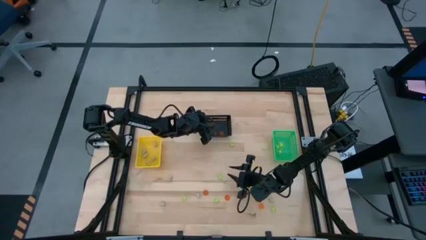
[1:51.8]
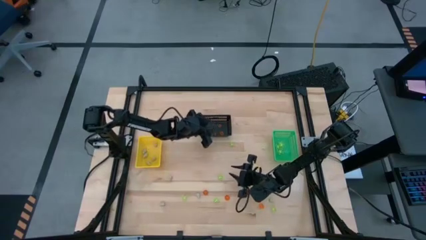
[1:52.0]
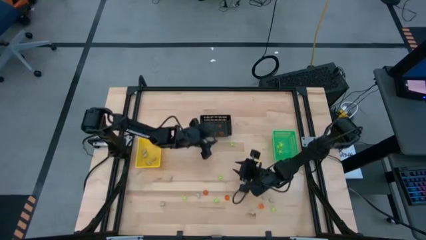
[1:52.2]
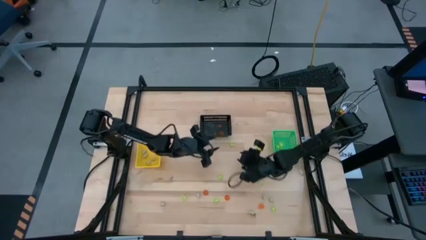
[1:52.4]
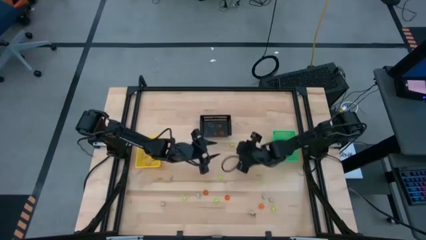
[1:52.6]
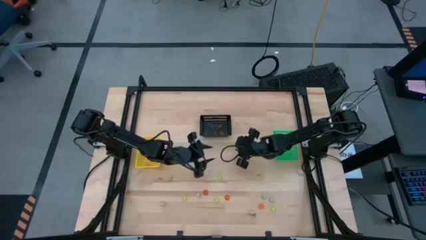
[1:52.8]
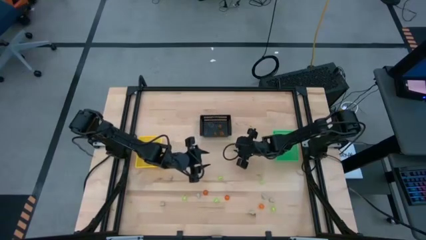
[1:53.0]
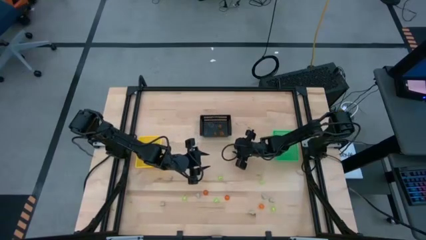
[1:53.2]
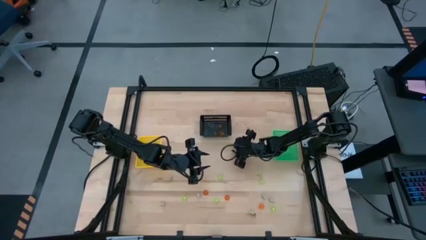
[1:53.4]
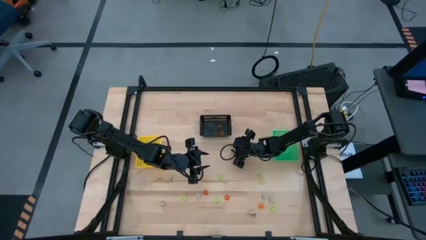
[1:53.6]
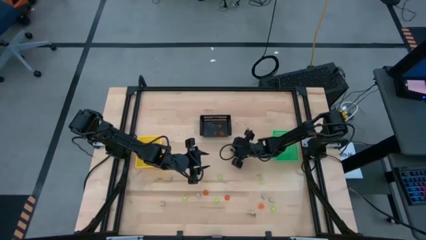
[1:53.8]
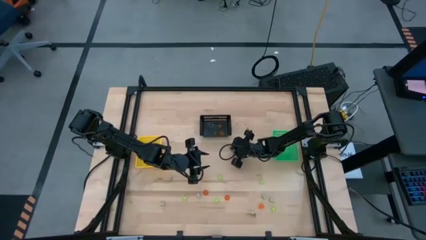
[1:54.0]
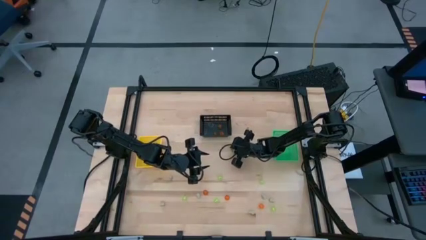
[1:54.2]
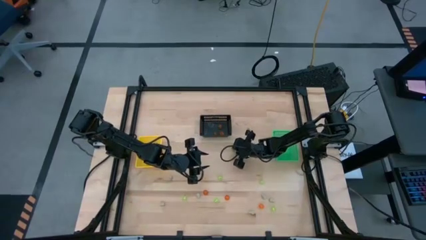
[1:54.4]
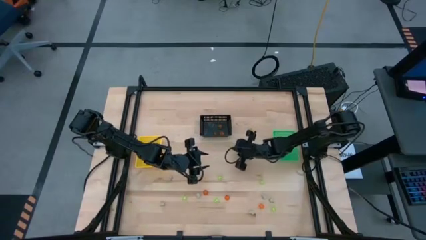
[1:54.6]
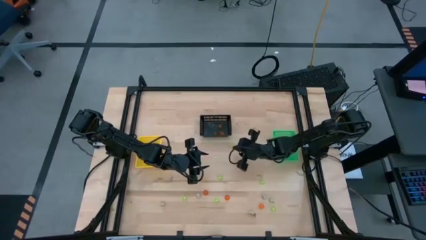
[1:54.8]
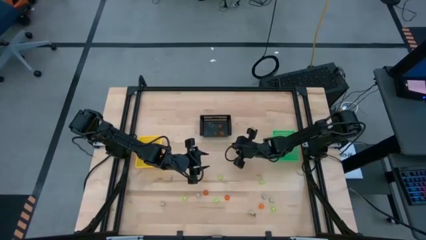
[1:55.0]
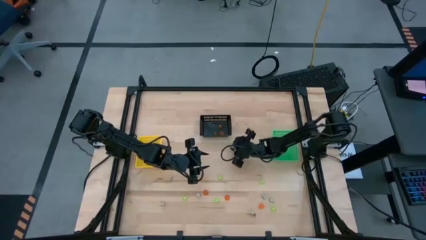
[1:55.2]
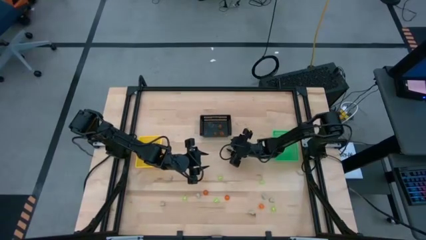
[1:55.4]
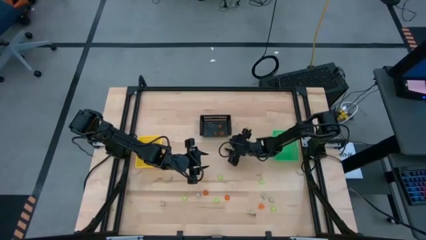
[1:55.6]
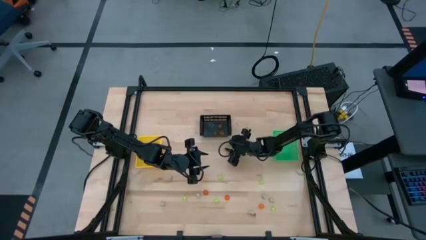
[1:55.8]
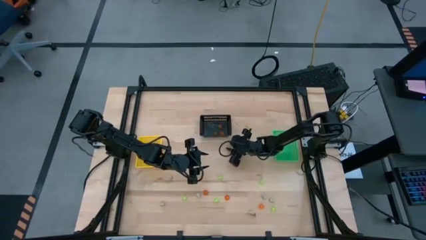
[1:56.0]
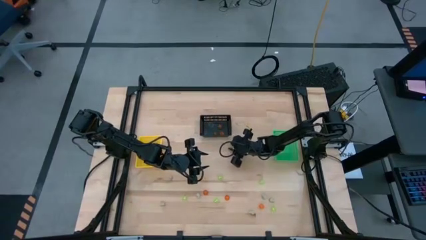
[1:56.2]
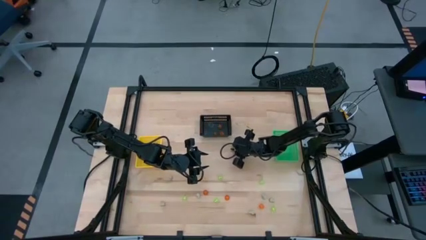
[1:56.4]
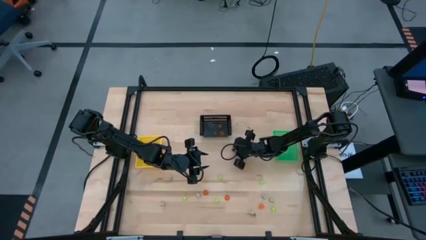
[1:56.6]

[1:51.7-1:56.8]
Task: Sort Halloween decoration
Put the green spider toy into the green bin

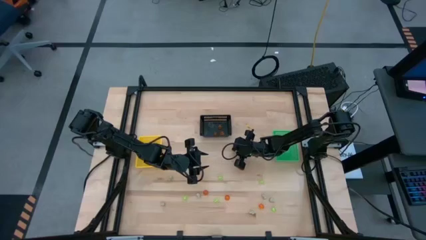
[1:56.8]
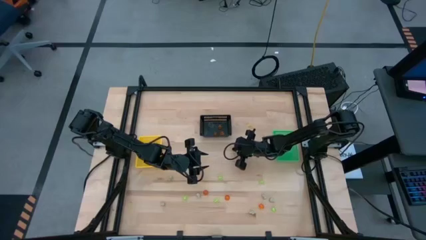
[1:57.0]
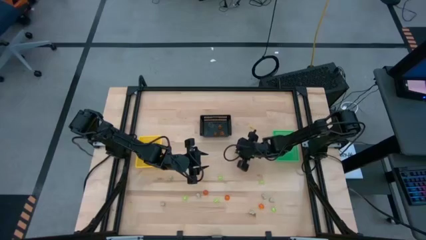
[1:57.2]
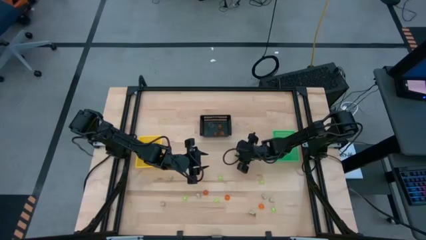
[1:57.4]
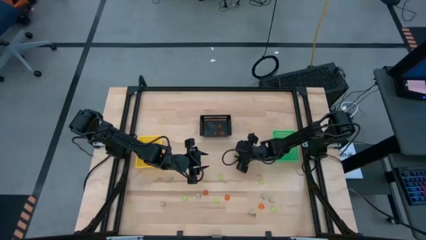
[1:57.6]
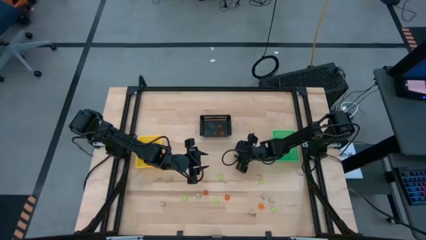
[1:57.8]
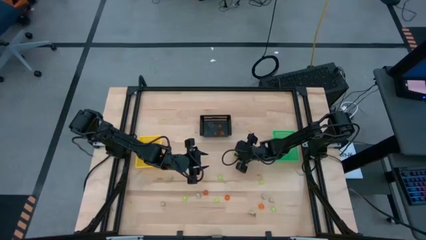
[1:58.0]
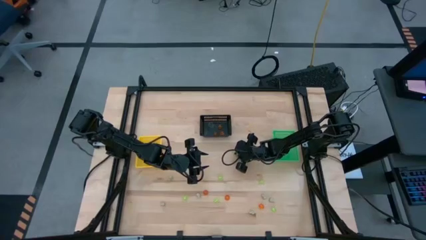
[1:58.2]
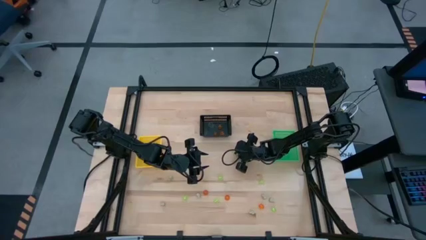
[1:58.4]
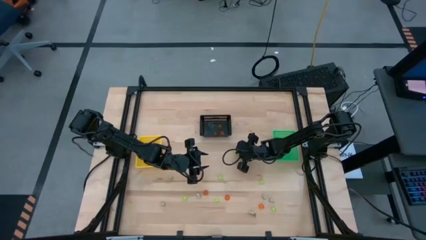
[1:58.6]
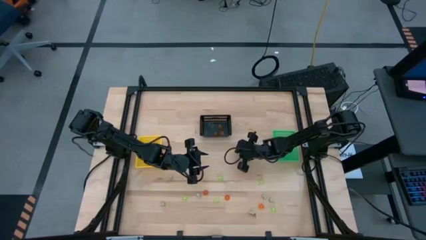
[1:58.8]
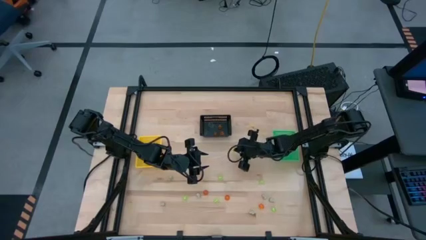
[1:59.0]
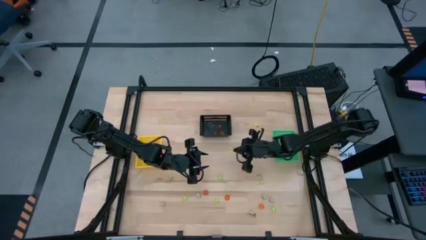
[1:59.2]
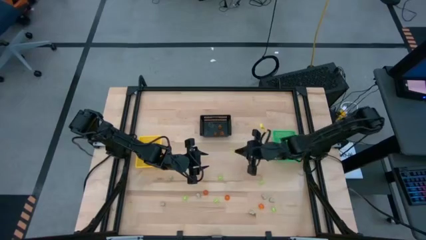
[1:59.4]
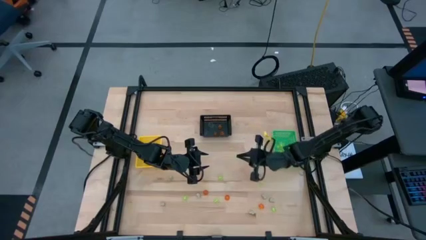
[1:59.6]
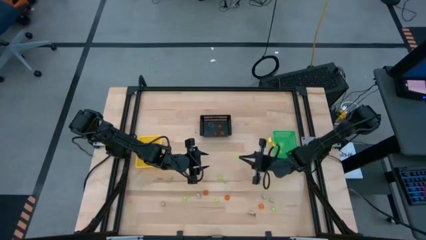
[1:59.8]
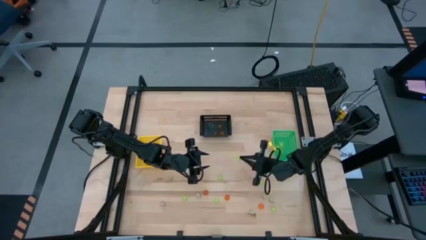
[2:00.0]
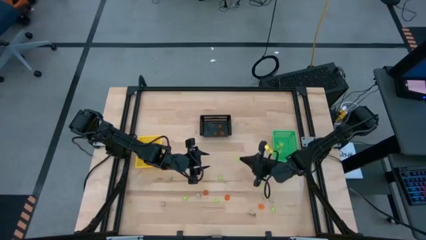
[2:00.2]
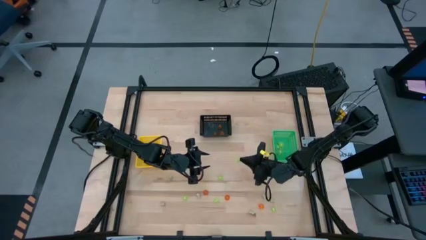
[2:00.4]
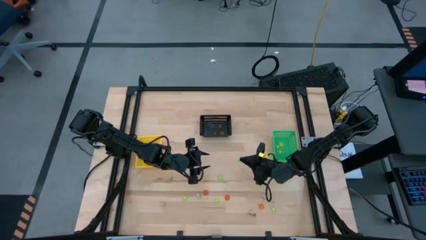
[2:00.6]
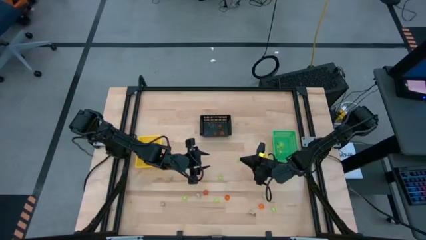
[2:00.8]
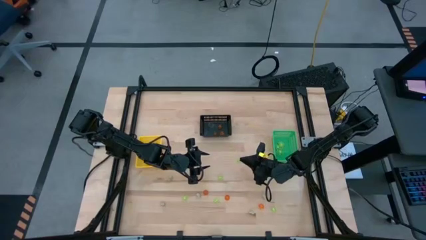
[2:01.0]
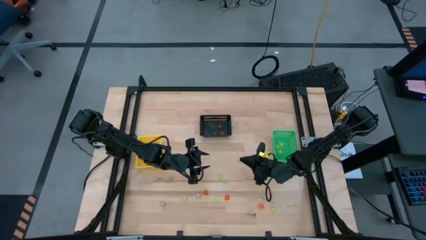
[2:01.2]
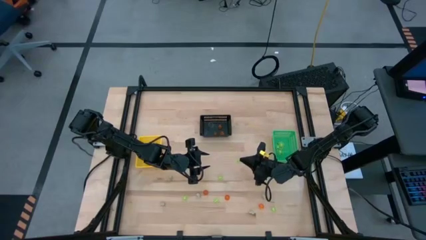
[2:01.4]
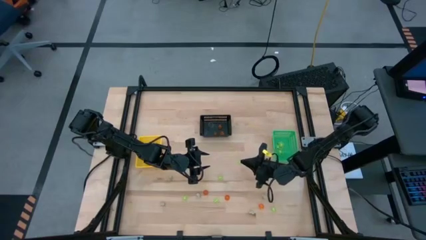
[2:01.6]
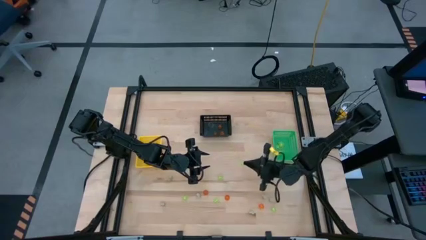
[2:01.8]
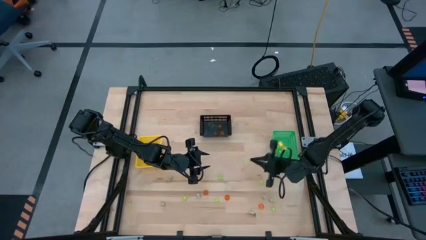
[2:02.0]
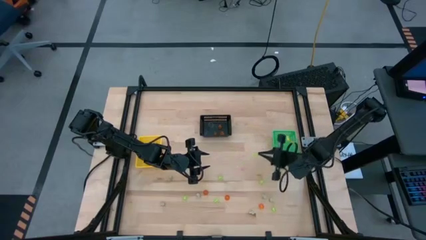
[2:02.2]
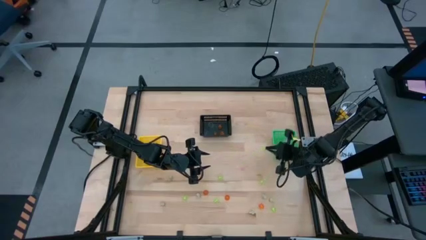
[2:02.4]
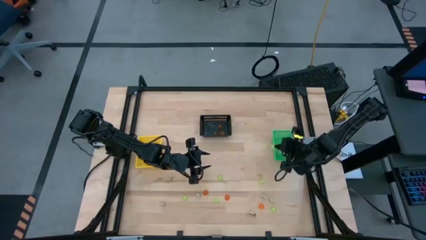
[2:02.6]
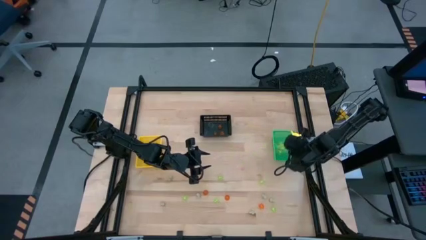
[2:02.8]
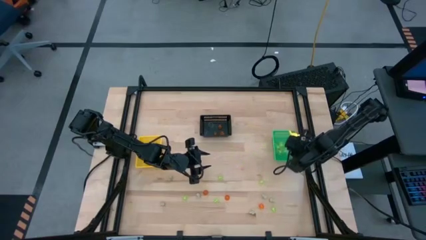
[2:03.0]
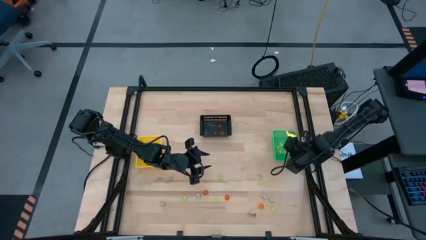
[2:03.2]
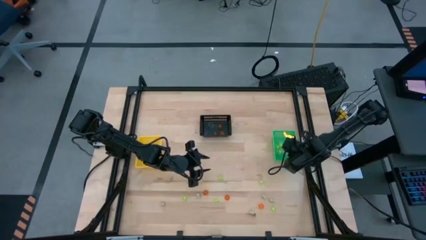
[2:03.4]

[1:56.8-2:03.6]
Put the green spider toy into the green bin

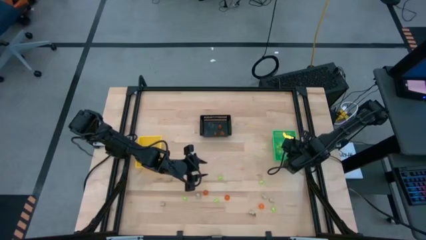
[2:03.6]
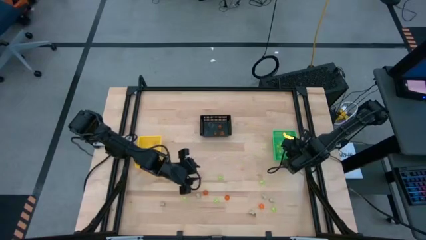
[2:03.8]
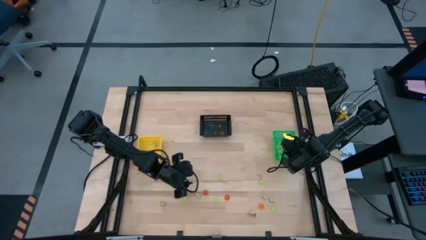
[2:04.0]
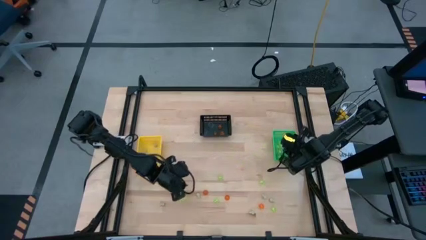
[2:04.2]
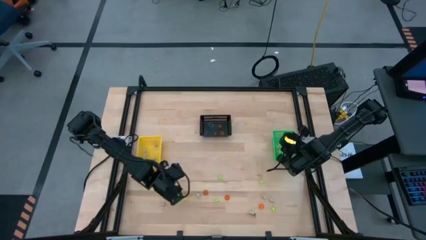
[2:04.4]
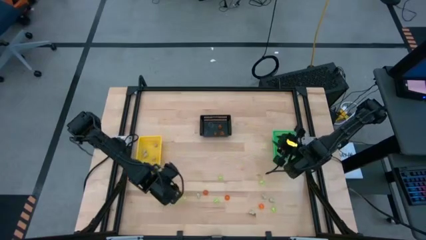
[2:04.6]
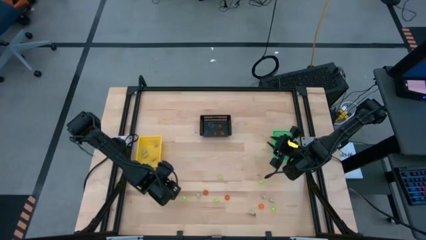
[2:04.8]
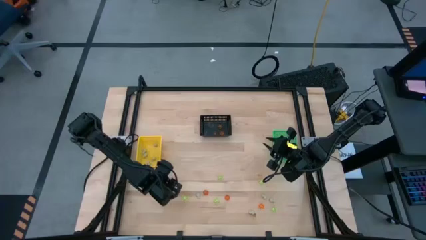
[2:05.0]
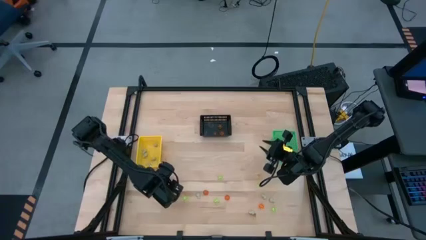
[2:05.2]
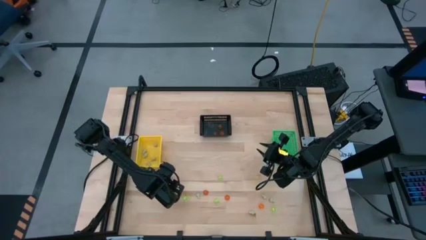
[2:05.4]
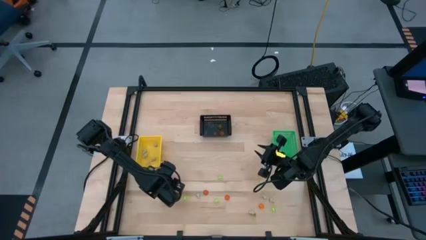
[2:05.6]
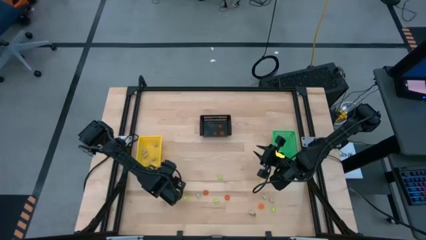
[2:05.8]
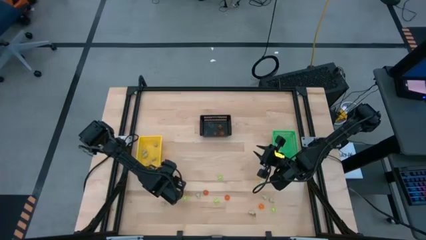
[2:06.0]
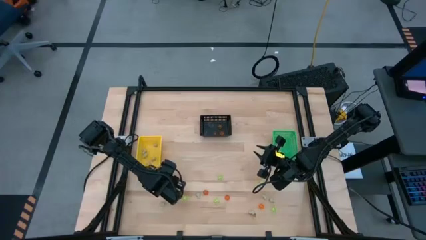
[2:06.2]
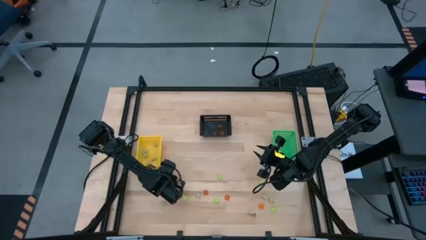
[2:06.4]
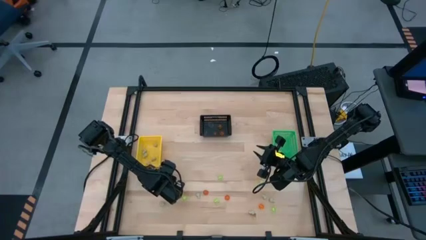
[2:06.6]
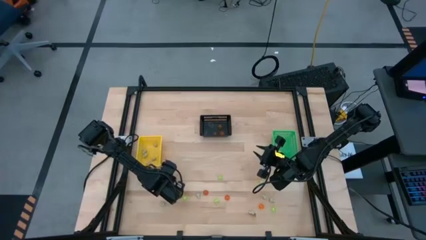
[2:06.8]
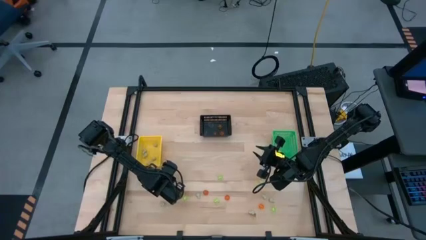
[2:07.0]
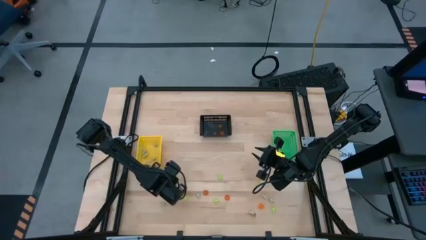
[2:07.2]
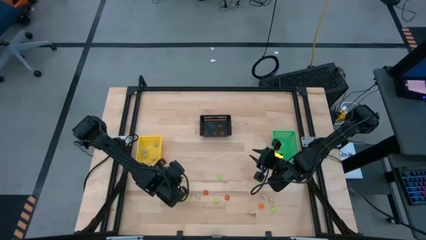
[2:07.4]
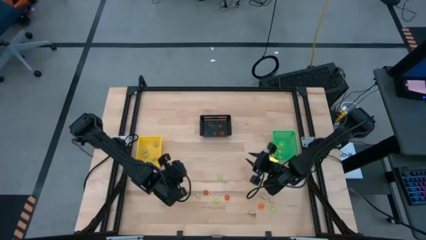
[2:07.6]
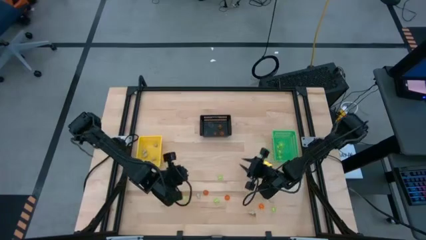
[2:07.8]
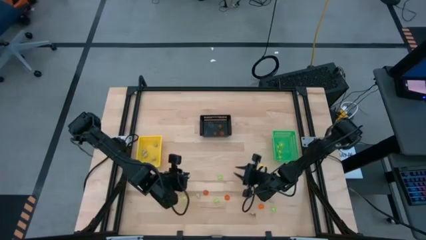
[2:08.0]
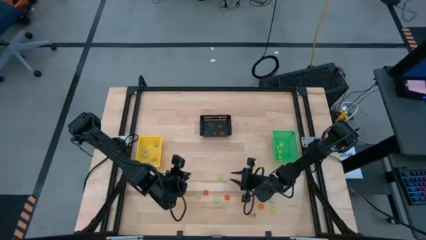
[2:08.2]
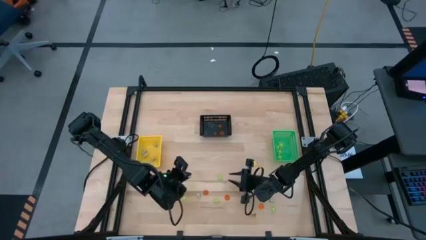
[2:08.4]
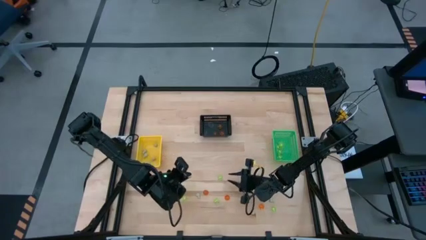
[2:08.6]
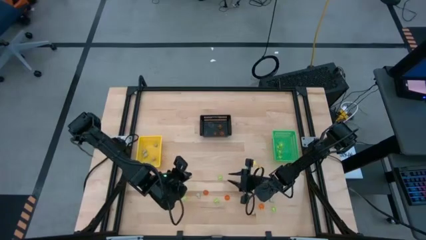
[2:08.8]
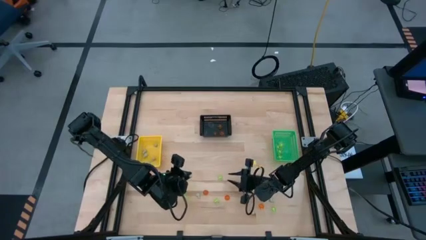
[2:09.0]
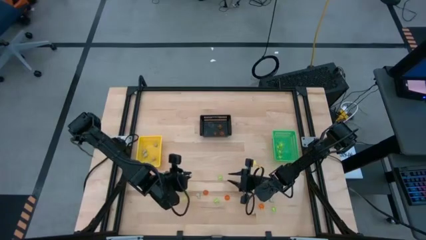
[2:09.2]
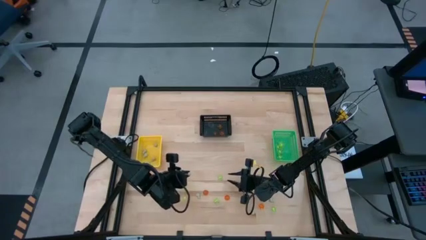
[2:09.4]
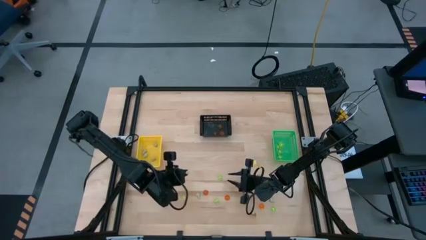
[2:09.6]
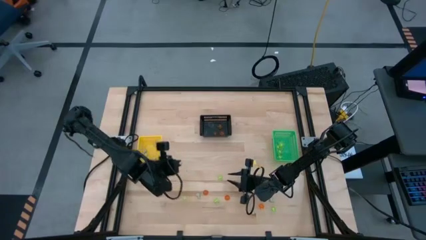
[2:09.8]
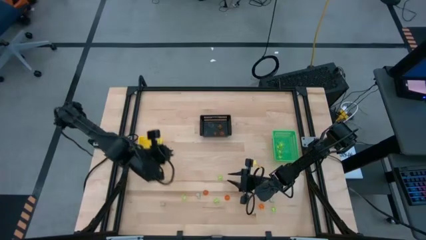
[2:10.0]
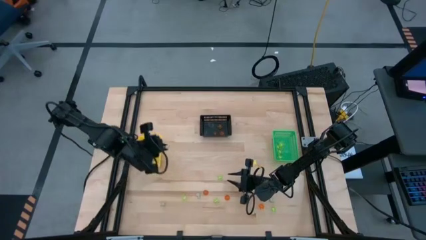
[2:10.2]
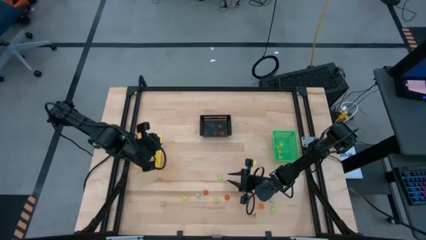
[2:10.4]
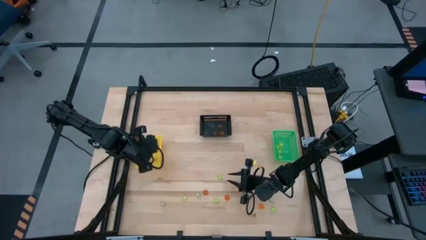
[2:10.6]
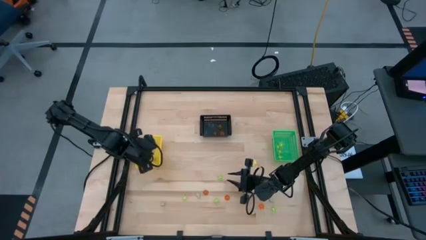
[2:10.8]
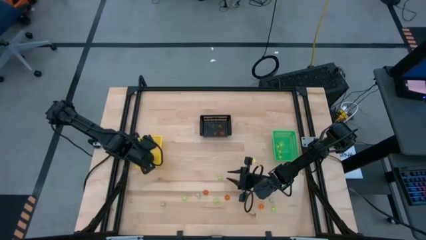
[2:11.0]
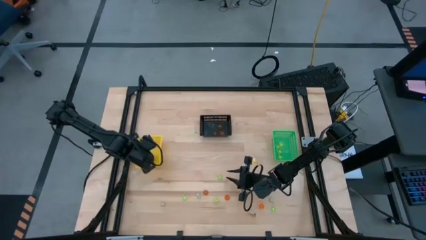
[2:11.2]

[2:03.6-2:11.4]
Put the white skull toy into the yellow bin
